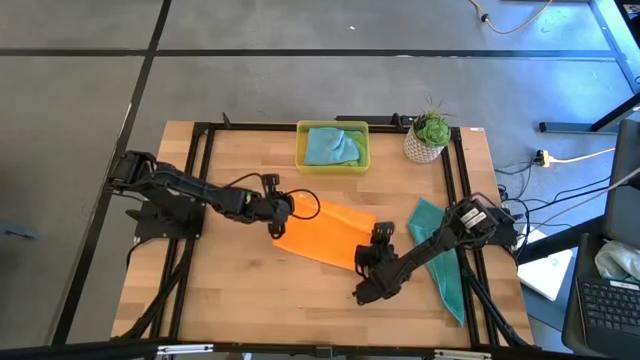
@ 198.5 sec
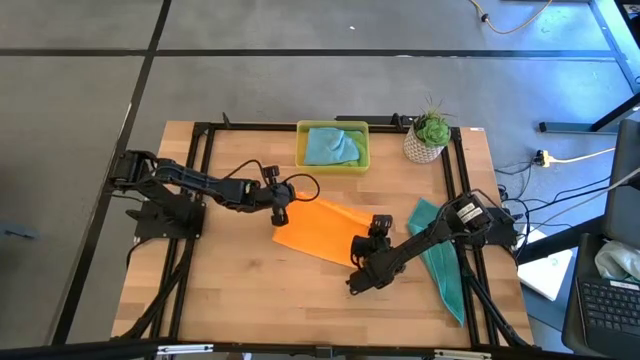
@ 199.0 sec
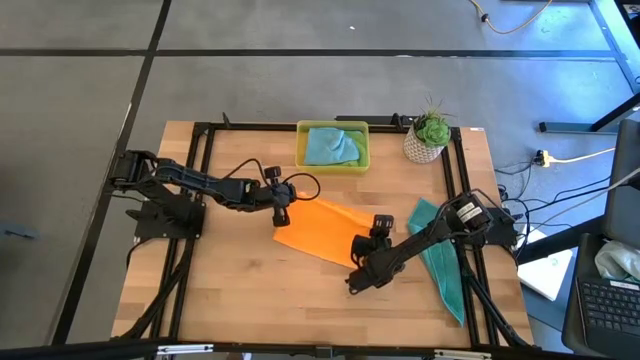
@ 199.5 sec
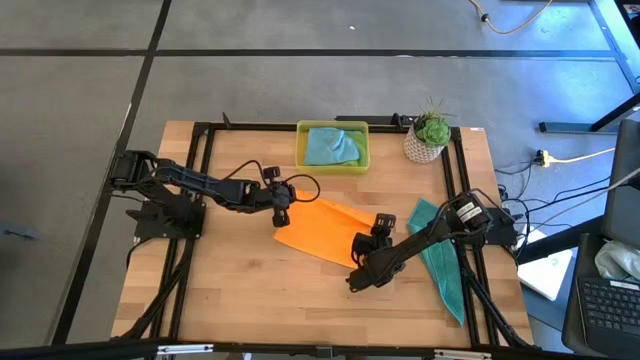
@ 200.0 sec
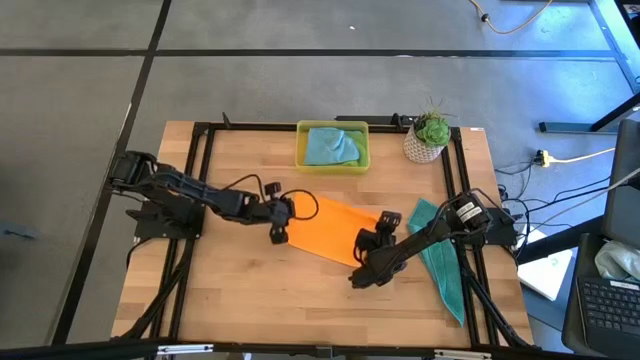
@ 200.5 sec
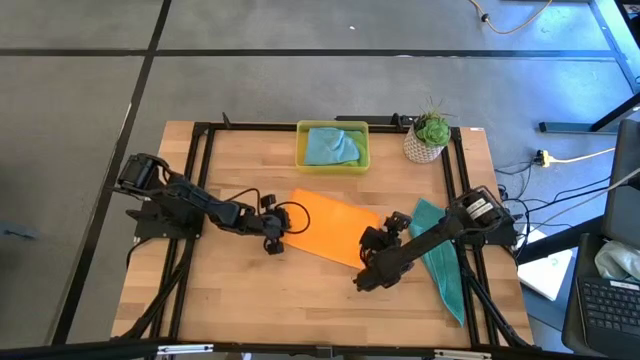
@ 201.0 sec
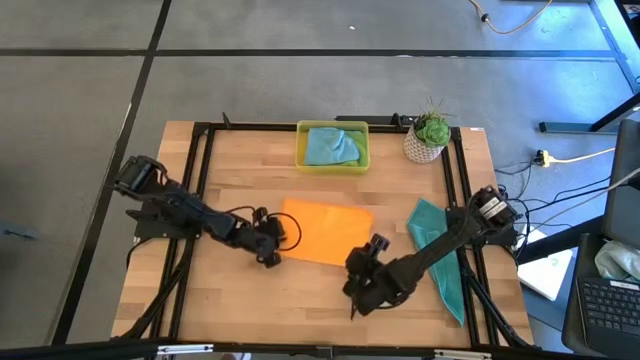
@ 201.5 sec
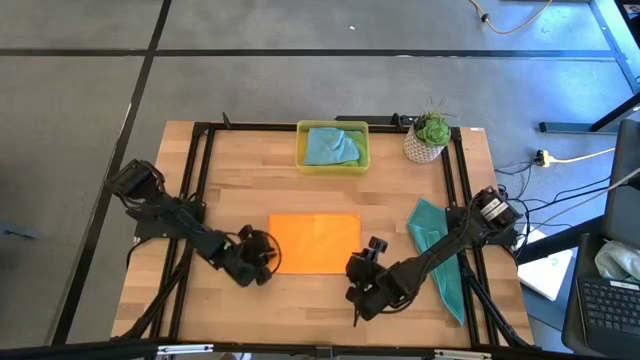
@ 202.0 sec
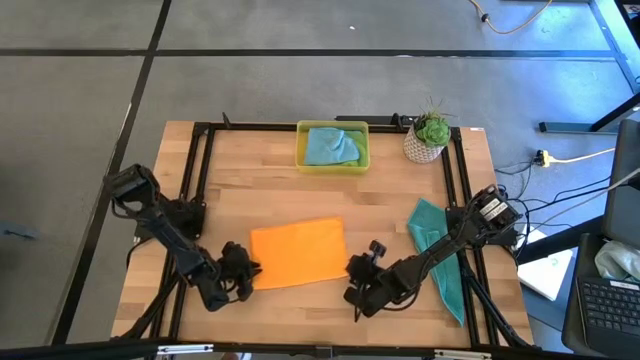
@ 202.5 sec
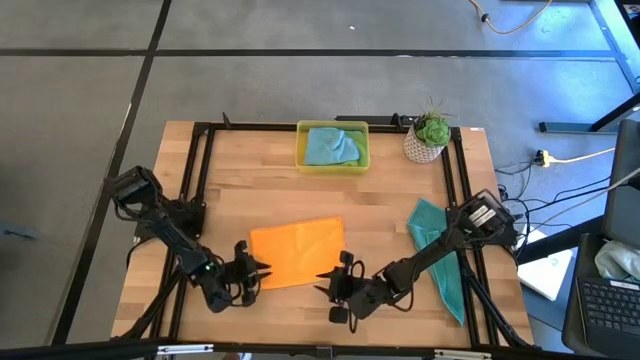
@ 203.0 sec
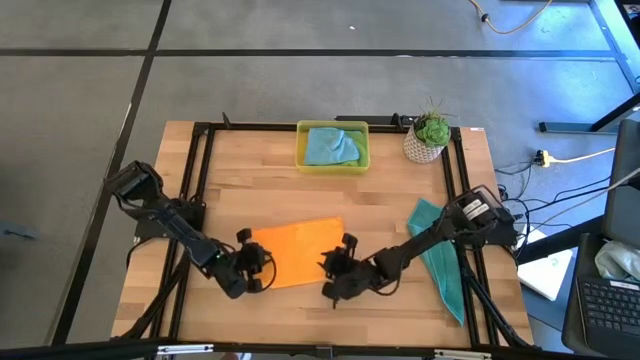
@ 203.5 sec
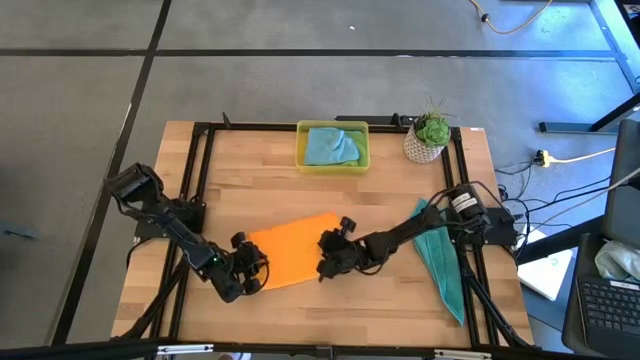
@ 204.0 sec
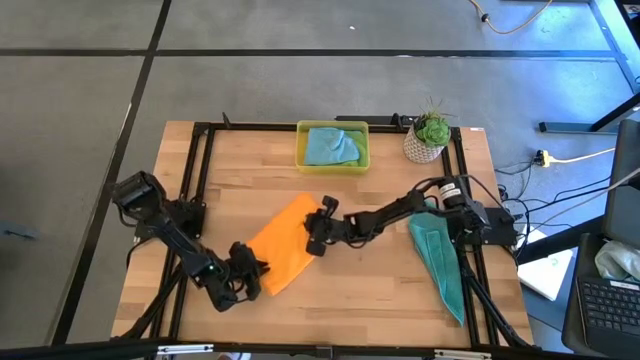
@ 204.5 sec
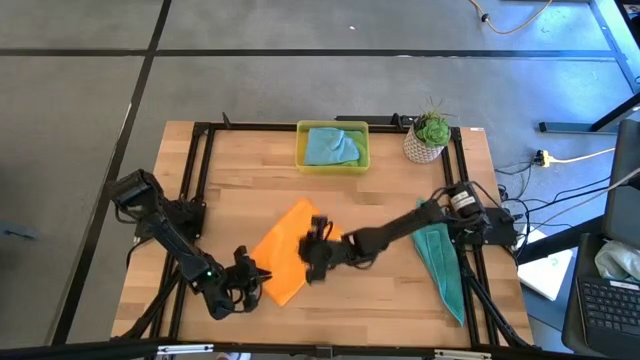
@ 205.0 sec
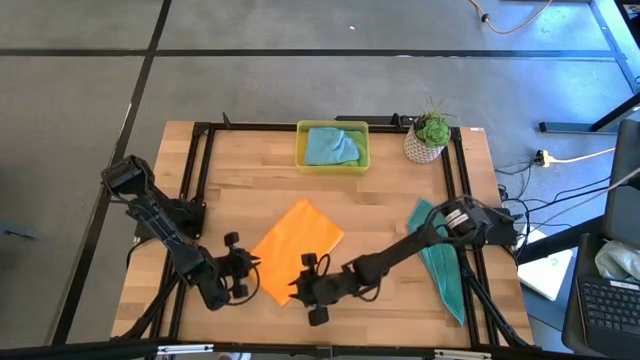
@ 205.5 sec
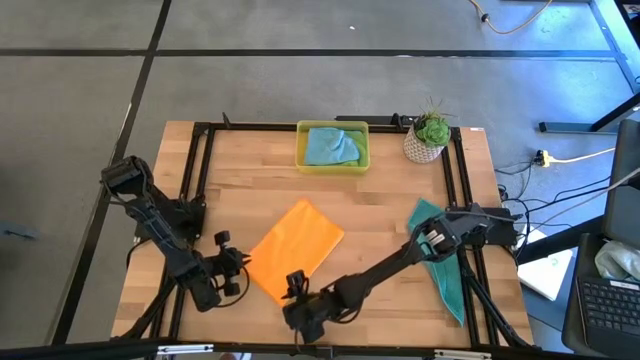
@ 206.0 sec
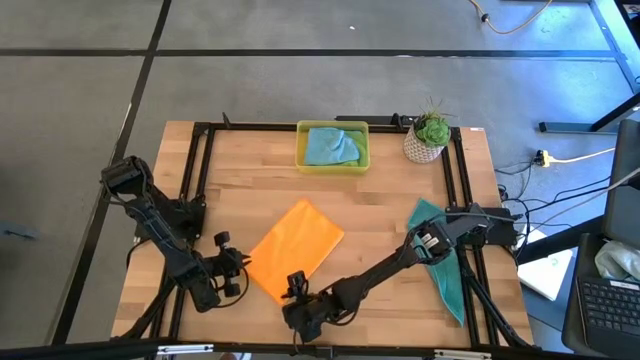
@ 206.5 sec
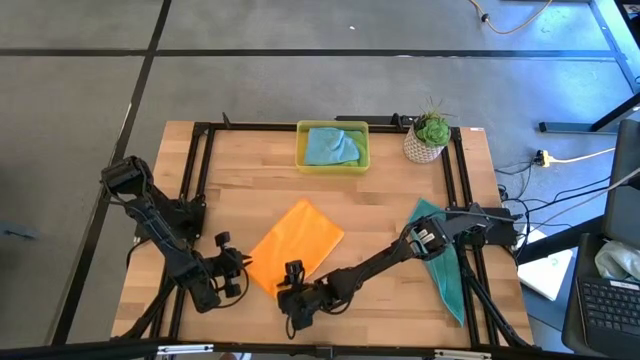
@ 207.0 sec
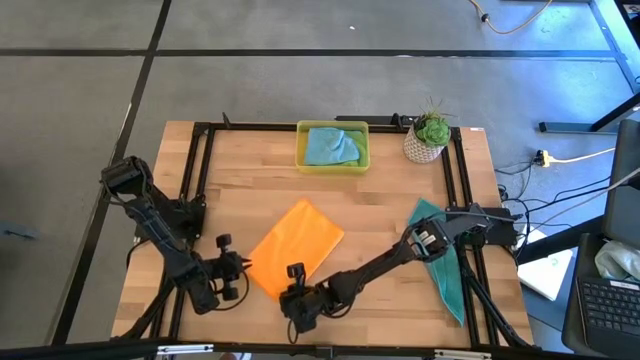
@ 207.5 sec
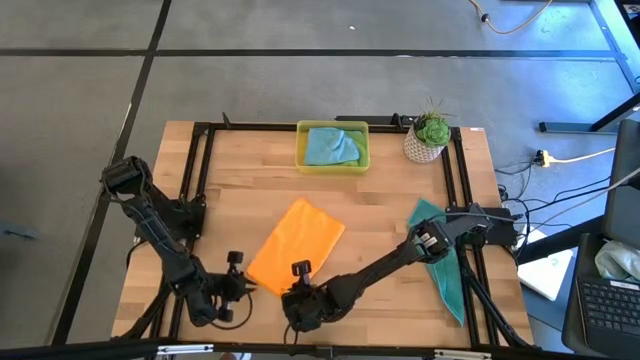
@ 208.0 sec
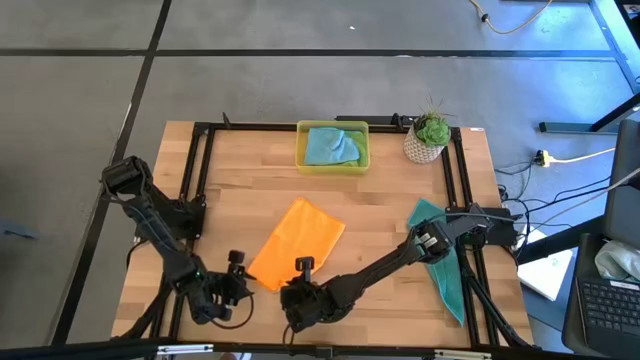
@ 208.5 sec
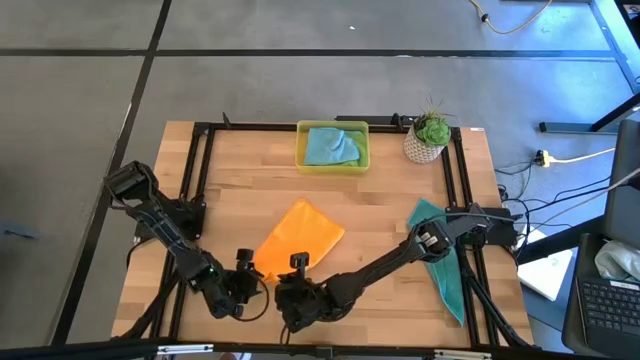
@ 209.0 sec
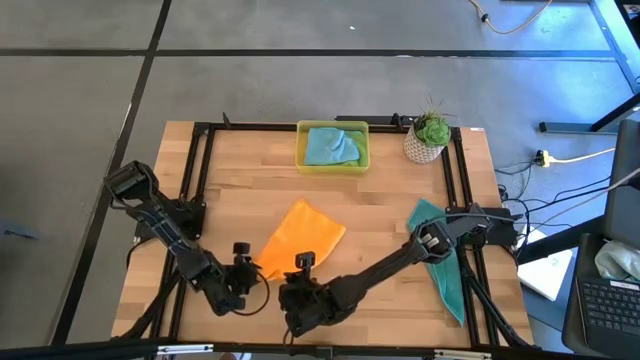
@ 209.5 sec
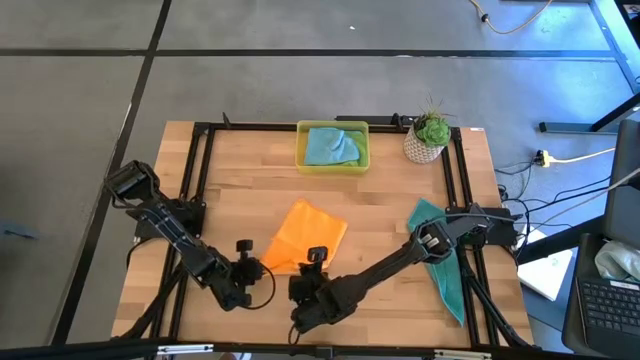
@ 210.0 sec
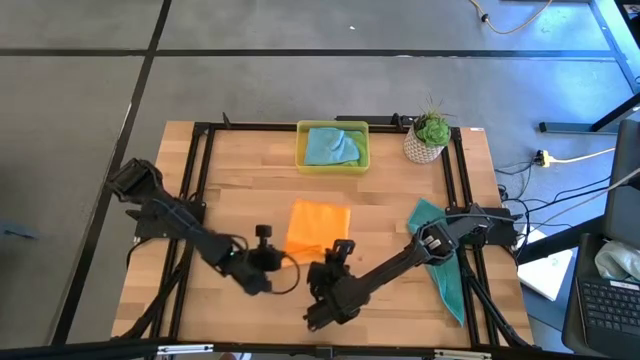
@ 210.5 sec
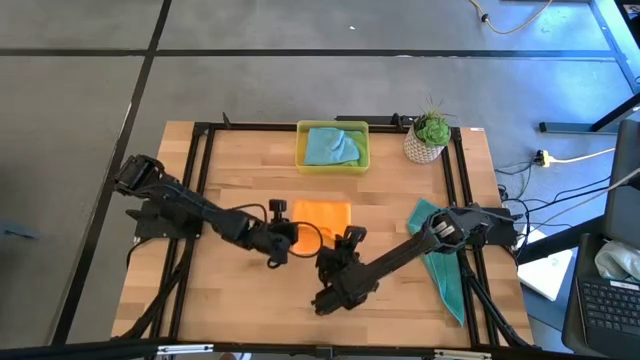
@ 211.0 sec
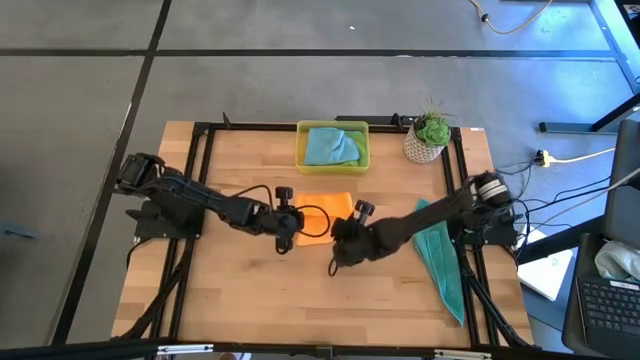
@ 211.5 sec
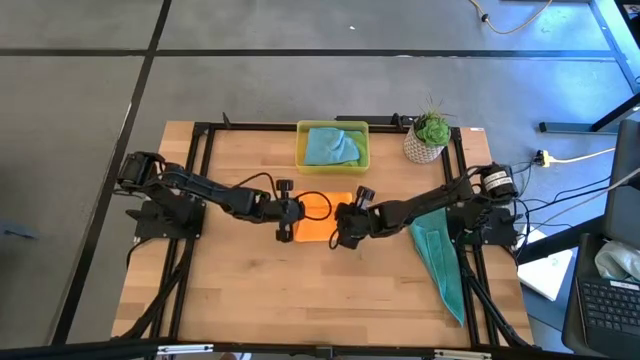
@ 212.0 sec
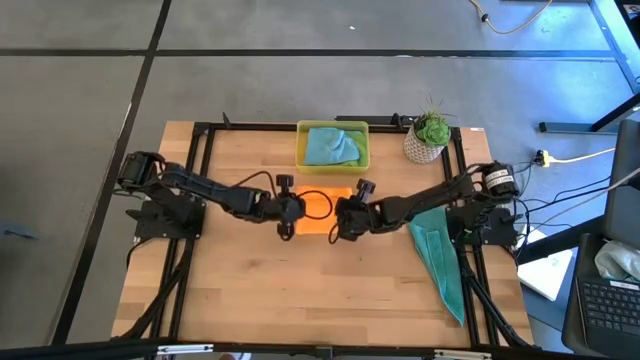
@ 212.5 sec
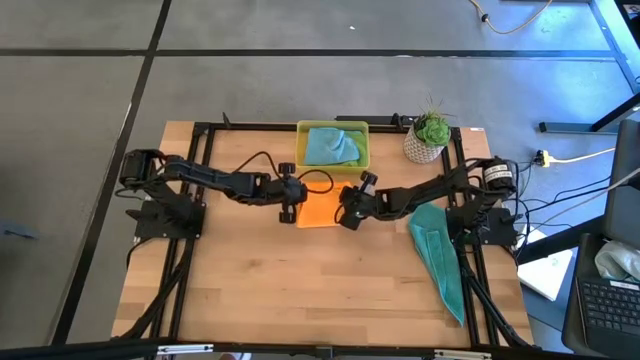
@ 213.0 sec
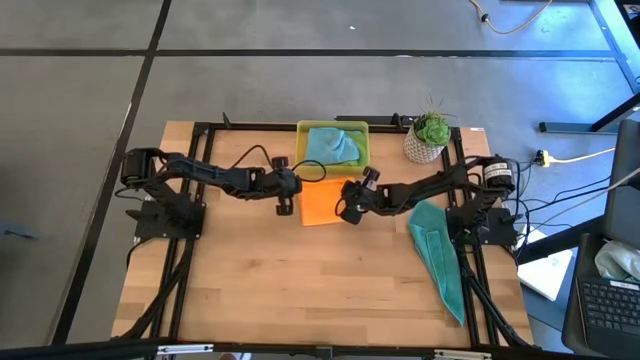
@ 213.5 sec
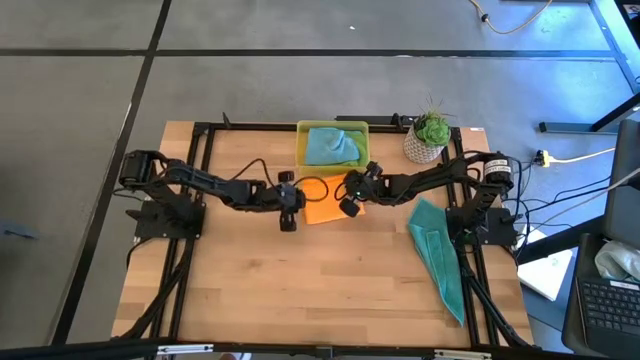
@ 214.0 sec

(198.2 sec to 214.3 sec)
Task: Fold microfiber towels
Fold the orange cloth

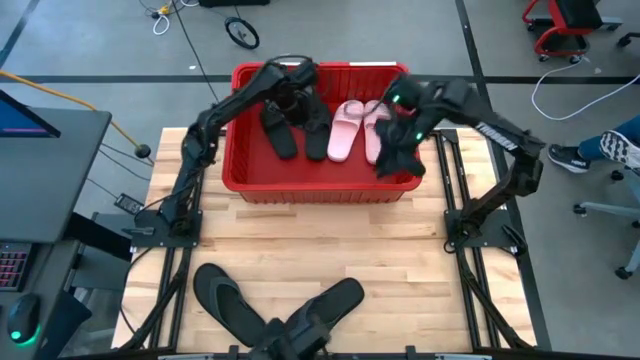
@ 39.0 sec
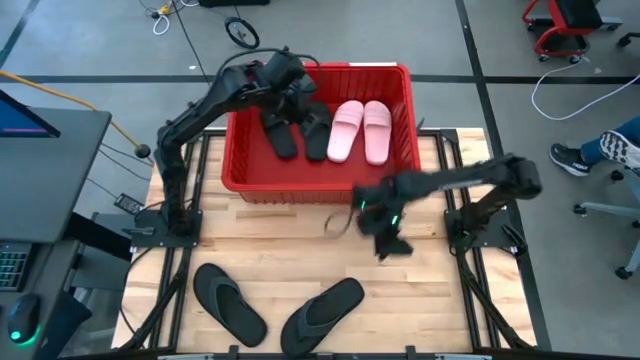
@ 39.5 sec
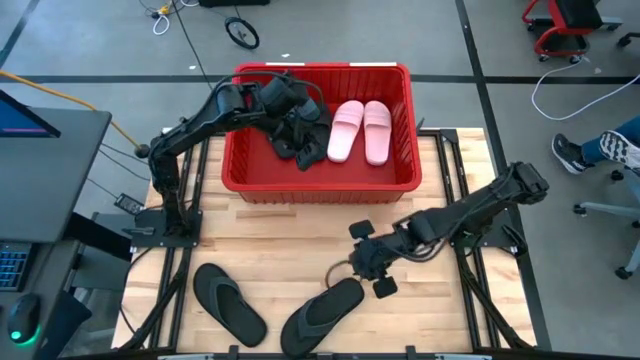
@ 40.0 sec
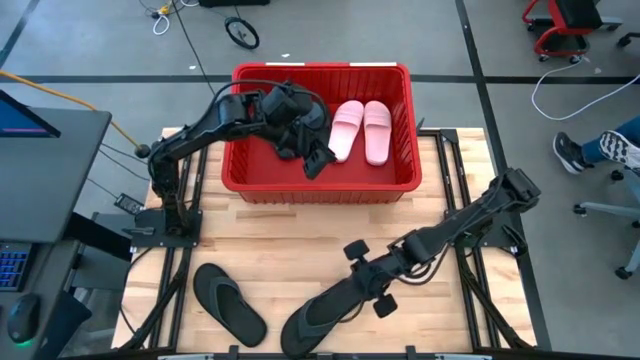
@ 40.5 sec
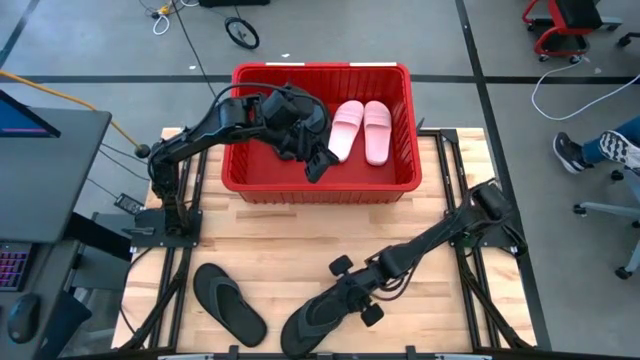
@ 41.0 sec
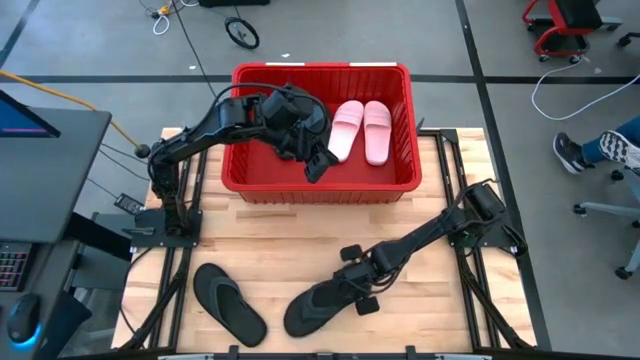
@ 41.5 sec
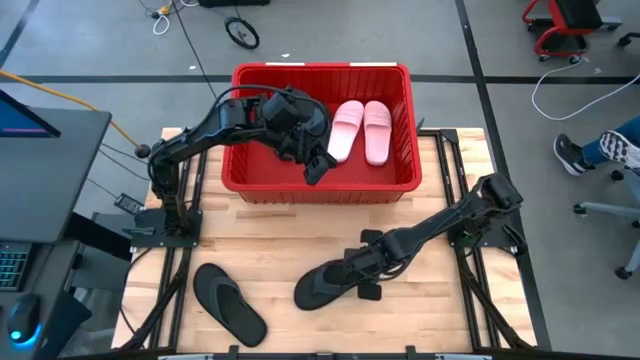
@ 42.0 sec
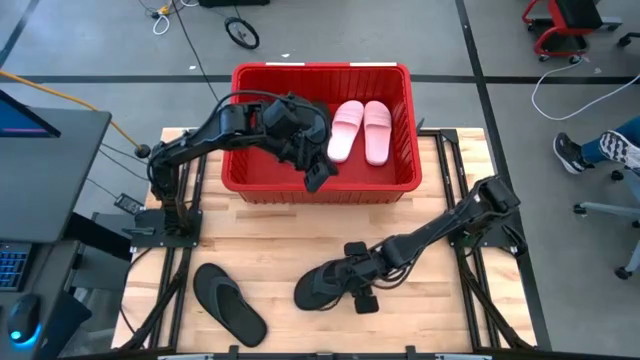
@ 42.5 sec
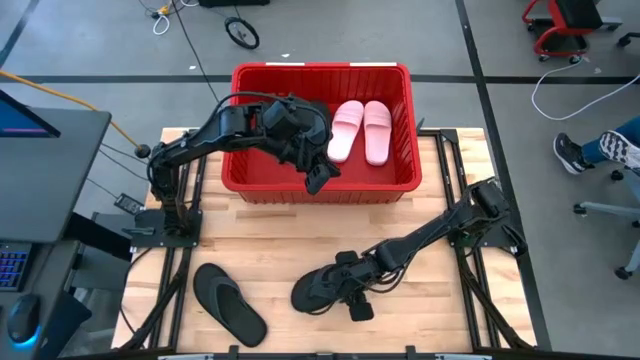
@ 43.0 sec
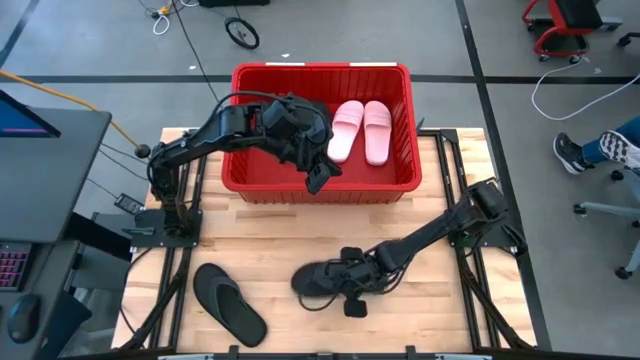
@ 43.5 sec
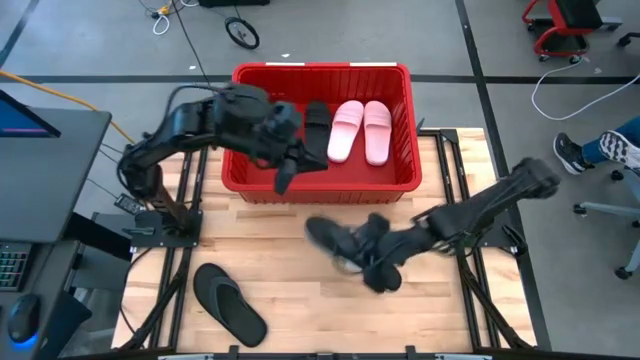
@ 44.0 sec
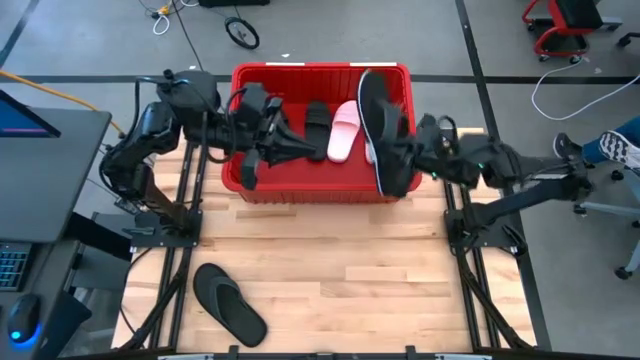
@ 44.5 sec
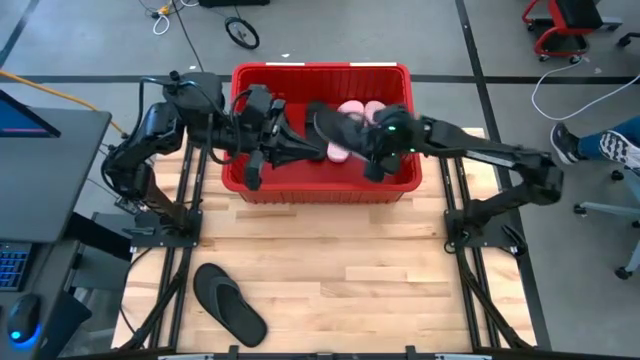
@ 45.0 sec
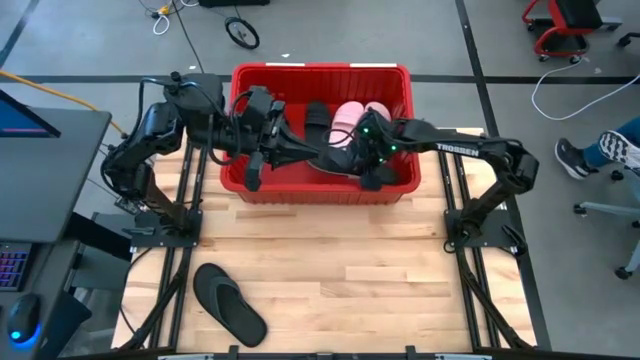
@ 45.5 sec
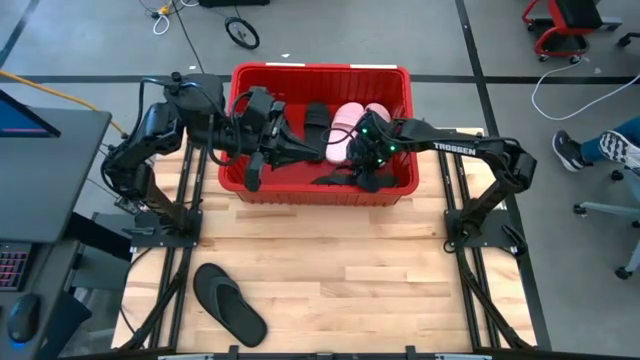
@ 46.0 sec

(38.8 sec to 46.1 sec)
Task: Pick and place slides into bin
Put the right black slipper into the red bin
